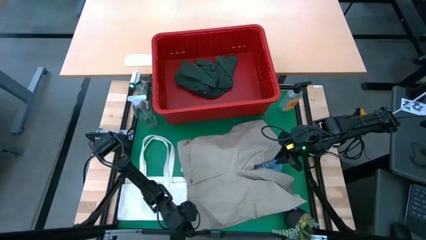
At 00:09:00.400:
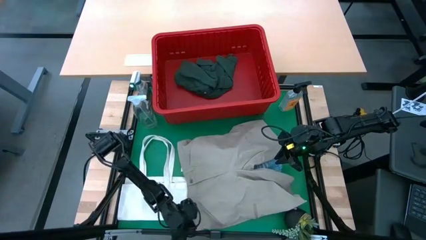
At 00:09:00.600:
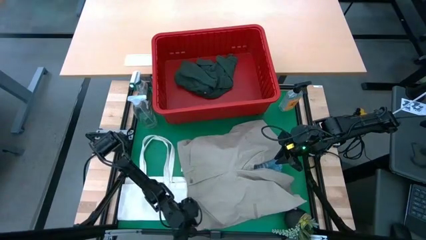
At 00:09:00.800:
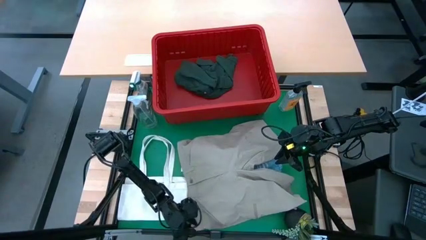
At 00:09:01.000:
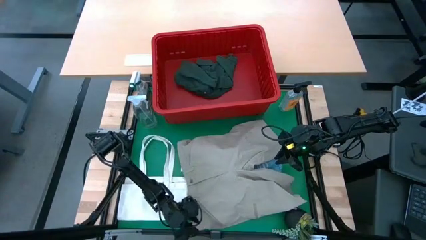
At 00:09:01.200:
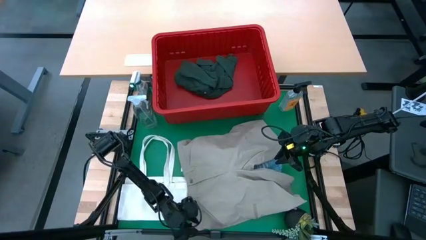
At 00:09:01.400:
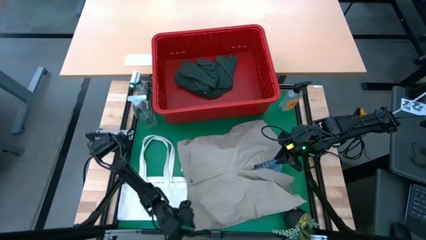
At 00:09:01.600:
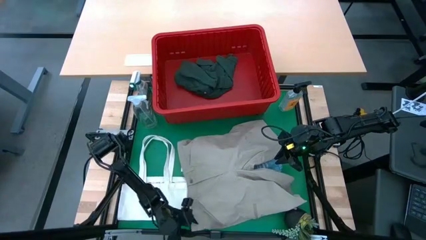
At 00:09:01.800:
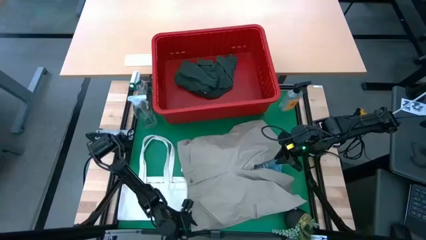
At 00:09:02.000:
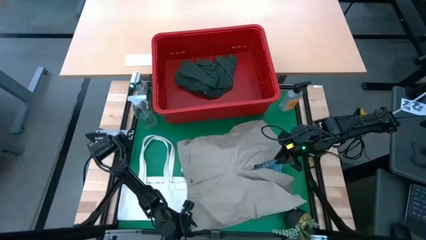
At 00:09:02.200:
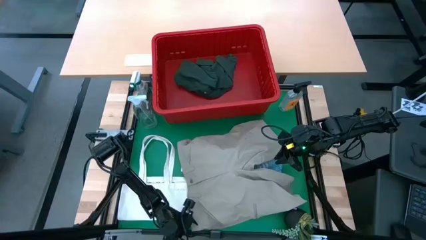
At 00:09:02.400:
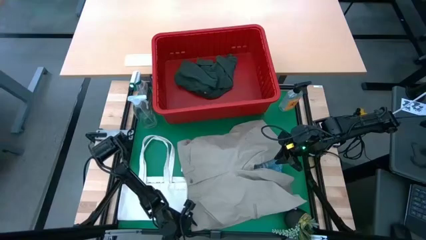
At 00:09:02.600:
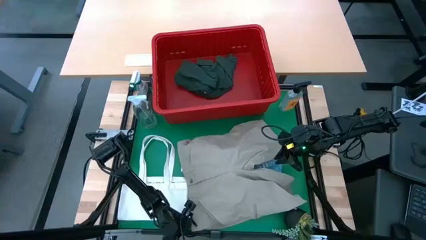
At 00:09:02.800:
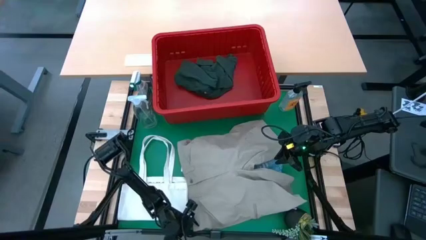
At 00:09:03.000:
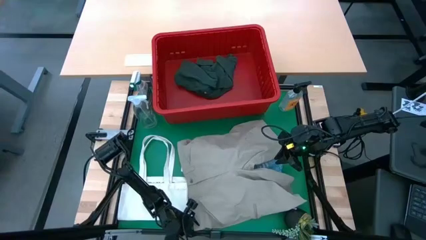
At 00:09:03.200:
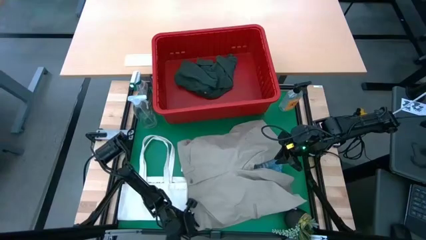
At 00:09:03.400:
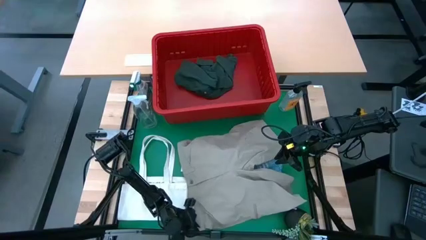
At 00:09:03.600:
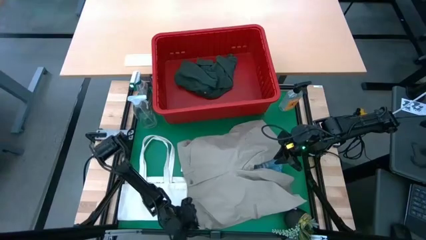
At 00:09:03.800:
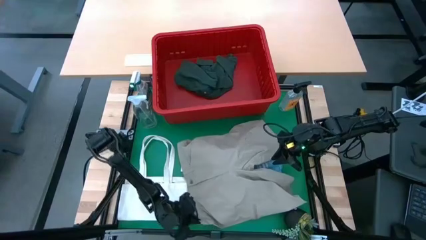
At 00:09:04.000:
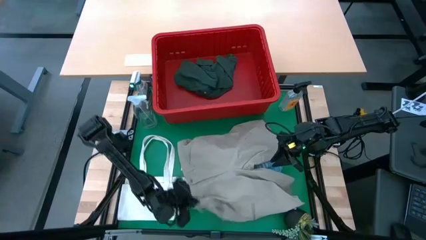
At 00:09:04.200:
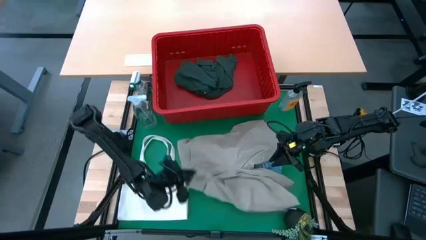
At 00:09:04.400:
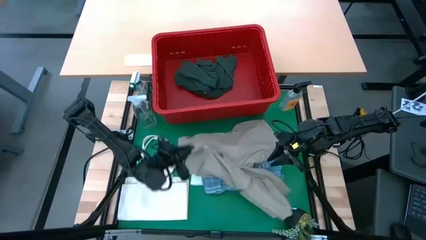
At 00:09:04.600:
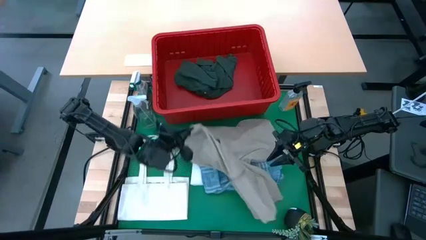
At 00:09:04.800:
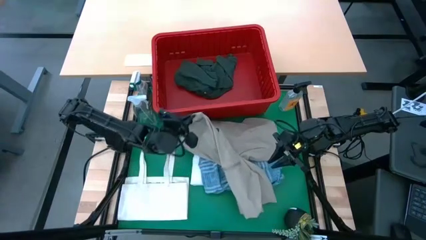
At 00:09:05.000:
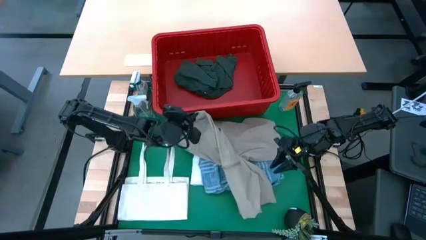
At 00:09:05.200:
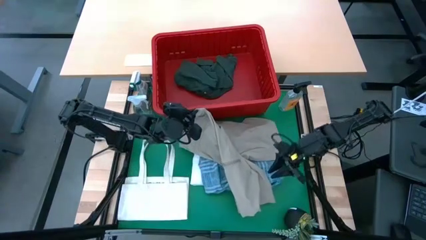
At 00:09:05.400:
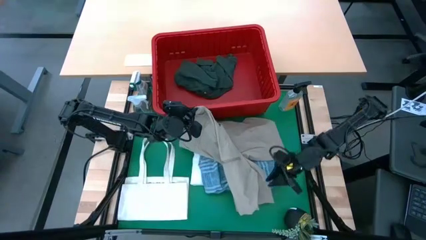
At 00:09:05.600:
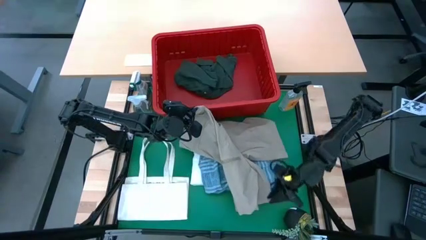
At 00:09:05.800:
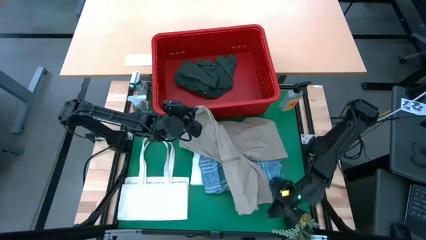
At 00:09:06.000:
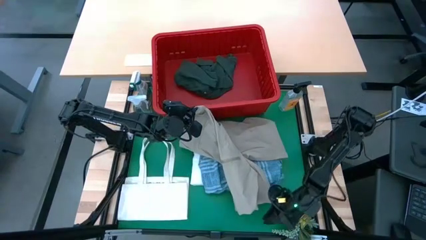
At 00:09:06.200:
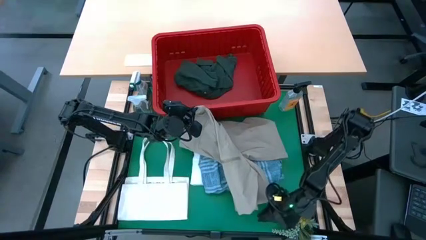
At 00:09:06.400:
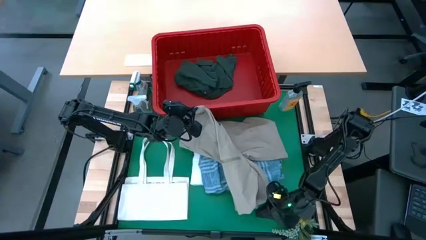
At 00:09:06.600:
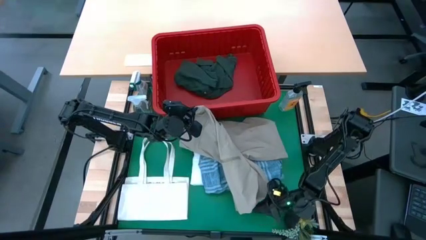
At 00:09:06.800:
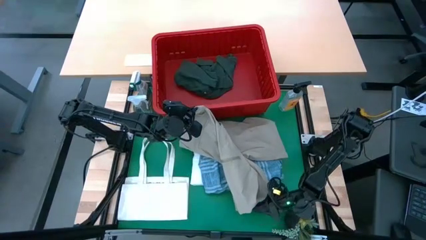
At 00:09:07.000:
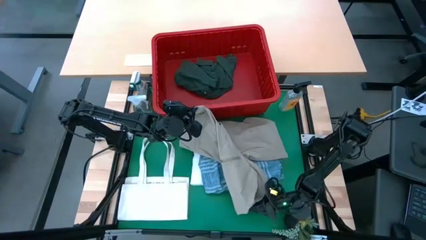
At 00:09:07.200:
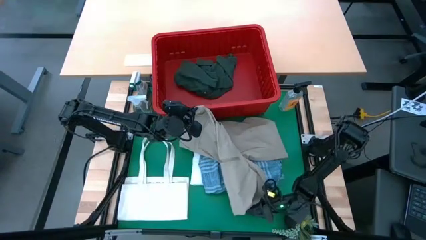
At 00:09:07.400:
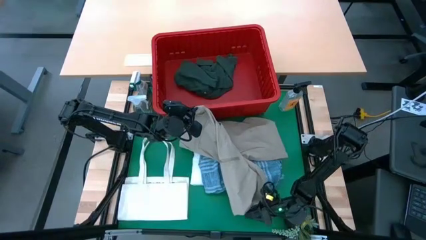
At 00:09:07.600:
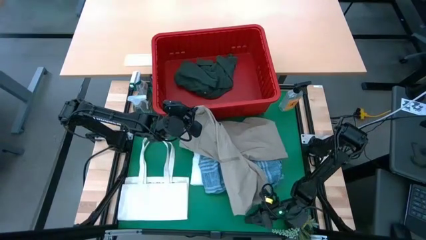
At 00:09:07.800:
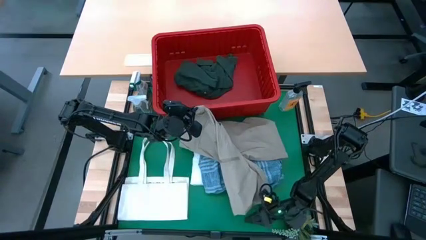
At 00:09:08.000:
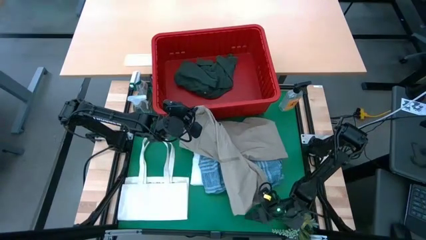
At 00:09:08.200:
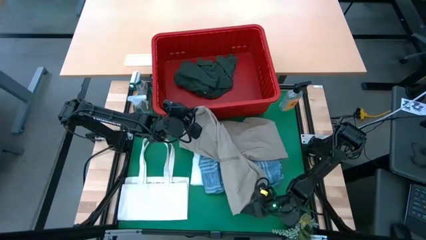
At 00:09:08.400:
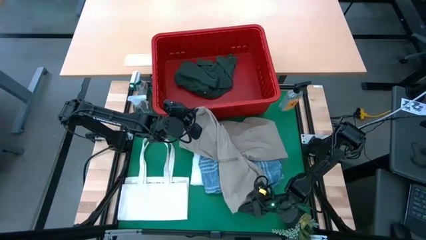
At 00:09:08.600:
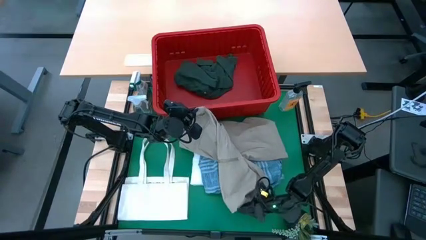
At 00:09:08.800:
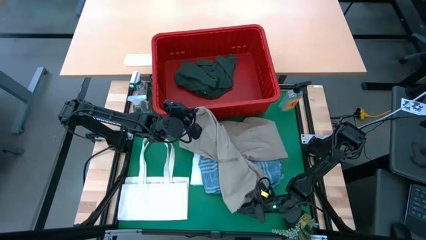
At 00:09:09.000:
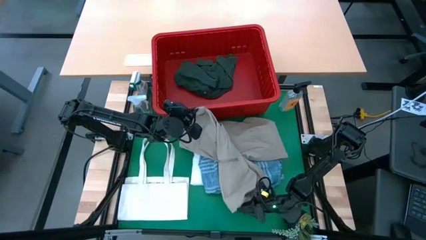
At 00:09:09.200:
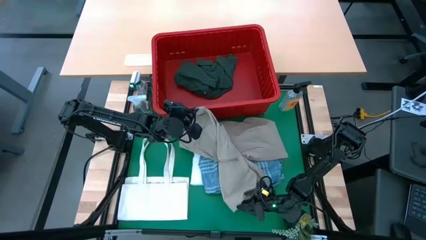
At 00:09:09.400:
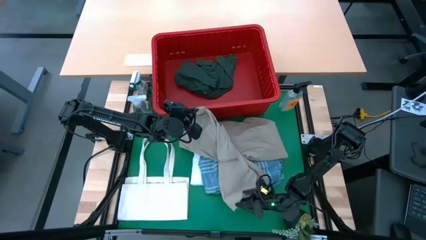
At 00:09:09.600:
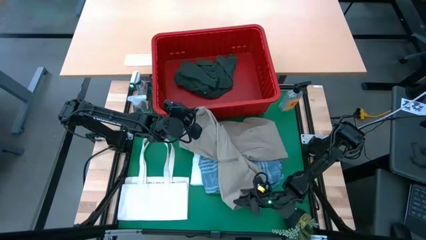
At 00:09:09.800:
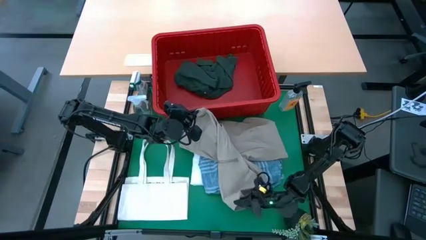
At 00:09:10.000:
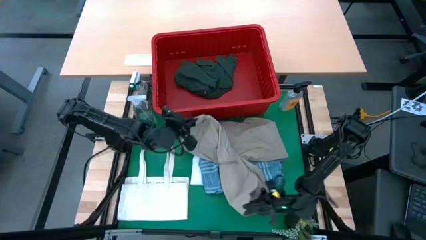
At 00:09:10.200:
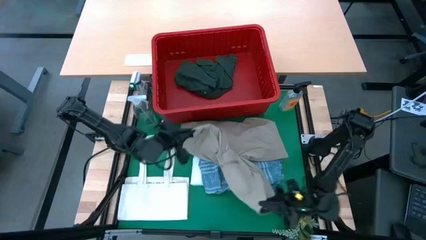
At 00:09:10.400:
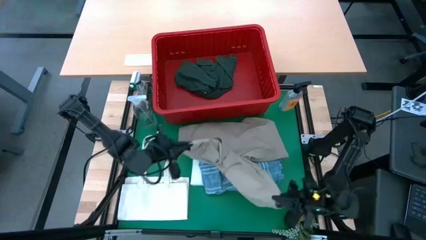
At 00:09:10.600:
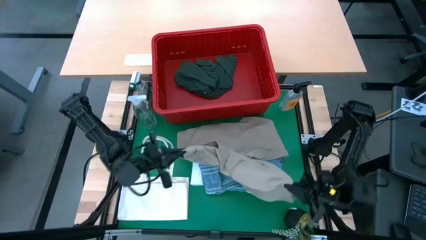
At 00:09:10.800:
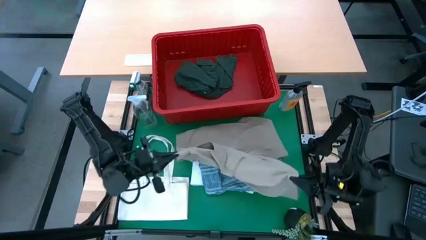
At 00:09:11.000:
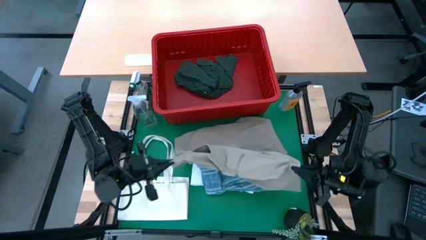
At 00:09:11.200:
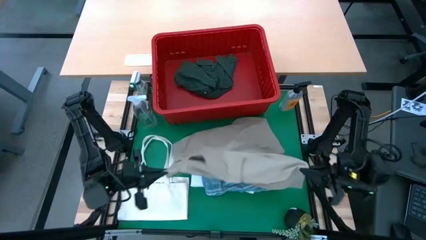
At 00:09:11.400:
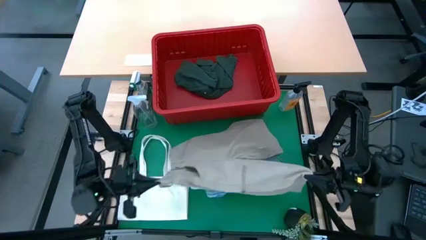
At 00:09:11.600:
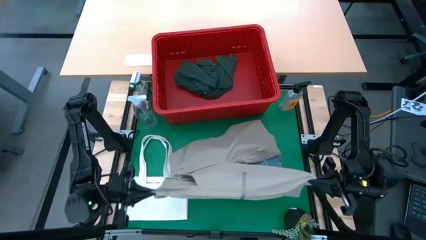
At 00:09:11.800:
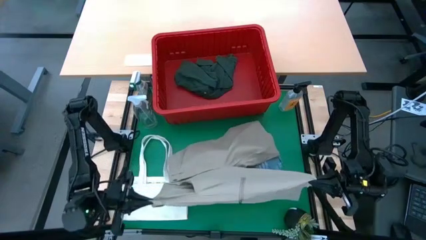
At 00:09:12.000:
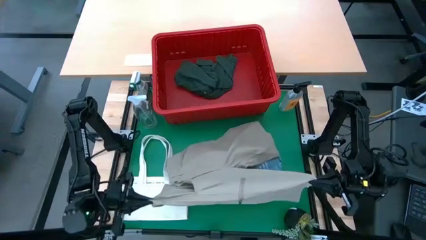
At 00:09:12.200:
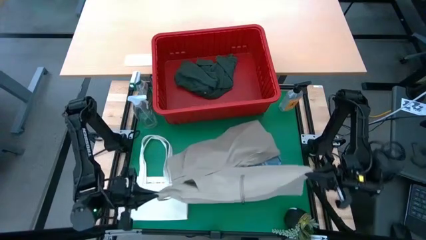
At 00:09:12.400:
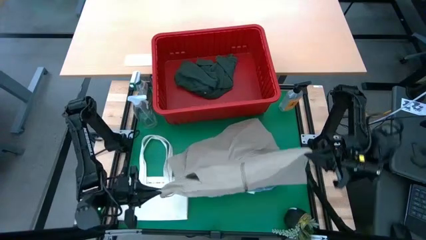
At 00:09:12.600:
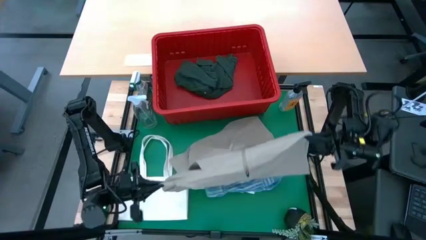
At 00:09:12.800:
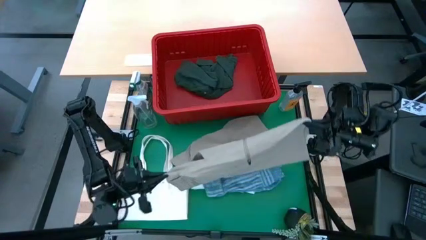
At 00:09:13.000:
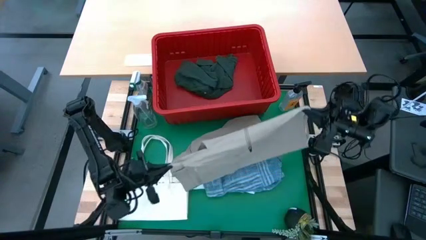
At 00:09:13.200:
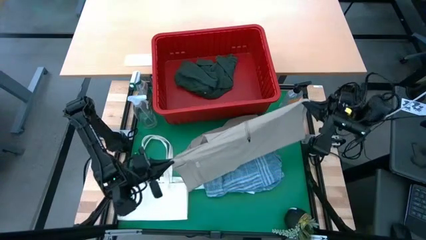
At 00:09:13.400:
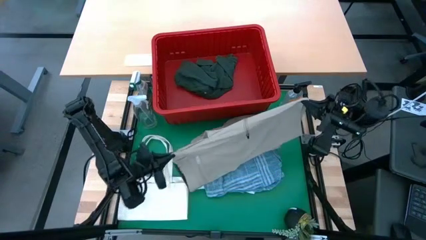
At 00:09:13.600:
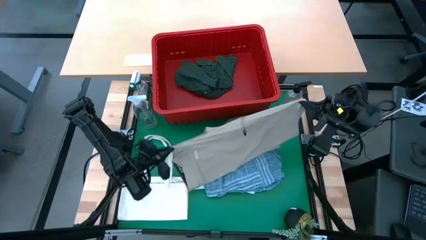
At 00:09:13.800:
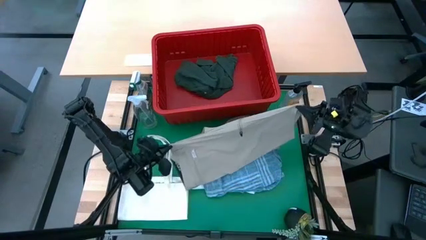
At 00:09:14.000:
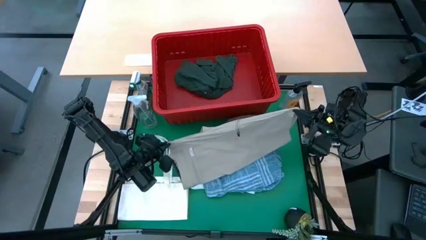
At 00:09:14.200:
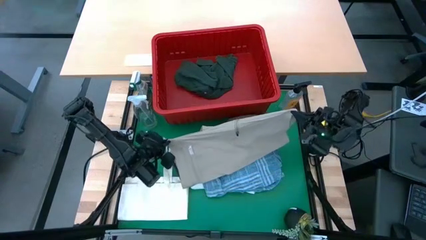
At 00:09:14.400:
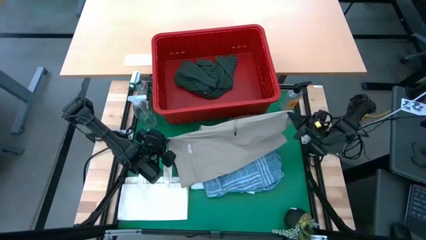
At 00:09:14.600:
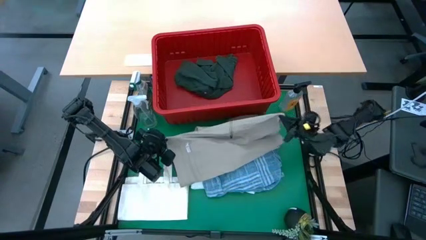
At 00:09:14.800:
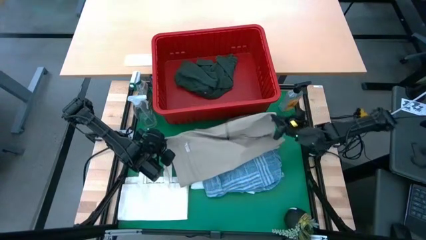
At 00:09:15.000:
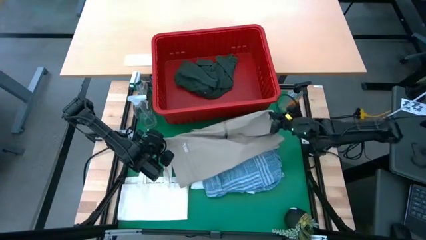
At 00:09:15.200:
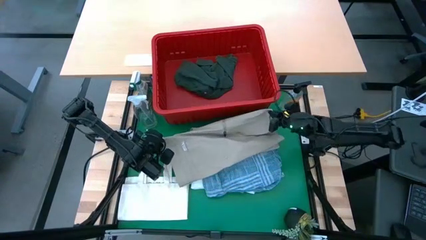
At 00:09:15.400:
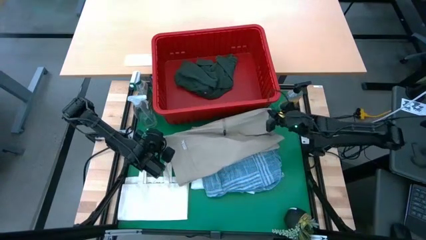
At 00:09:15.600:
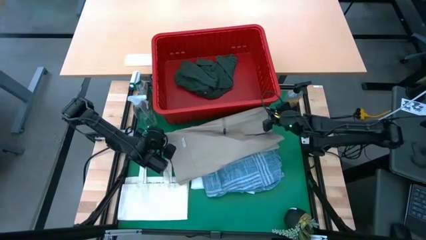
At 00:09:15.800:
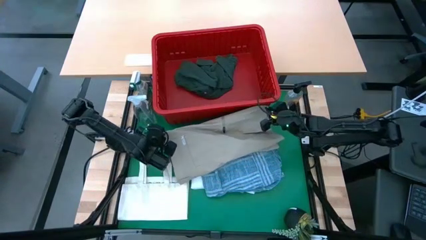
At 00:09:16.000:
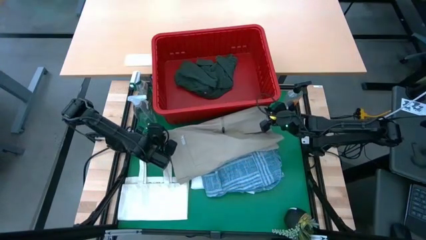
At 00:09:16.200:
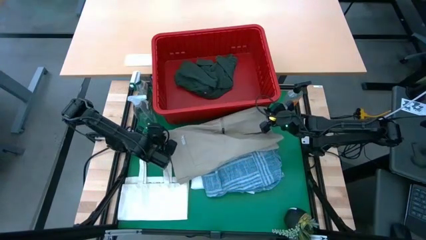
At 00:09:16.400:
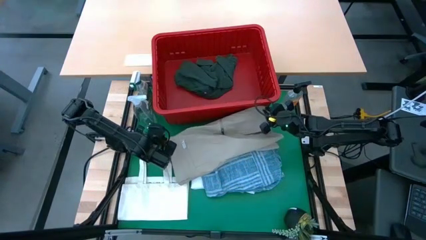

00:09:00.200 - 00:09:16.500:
Task: Fold Laundry from Bin
Fold the light brown shorts
